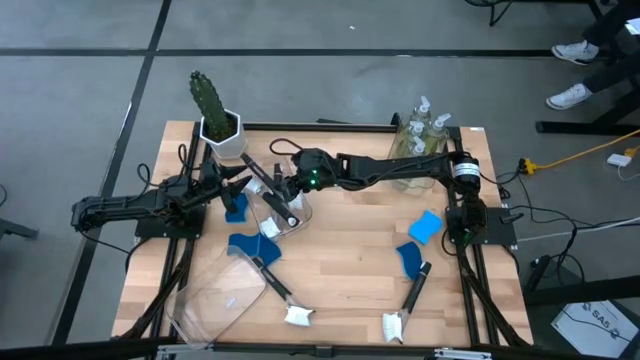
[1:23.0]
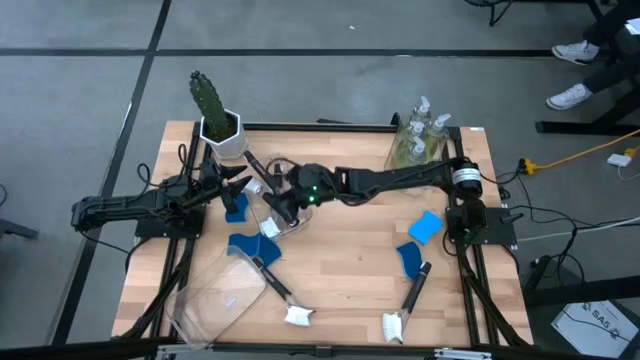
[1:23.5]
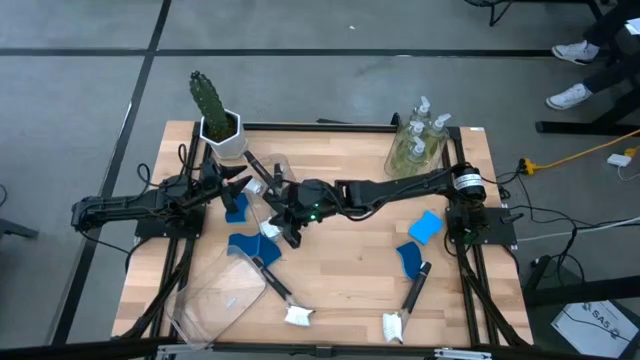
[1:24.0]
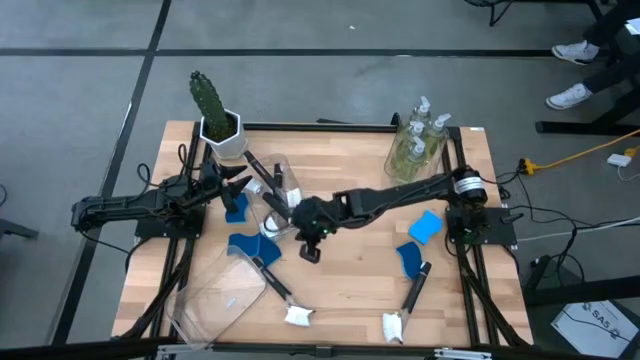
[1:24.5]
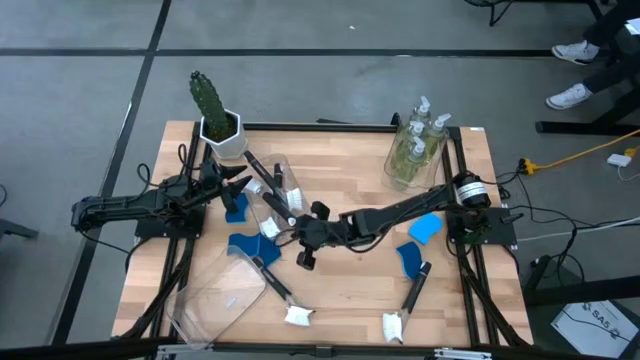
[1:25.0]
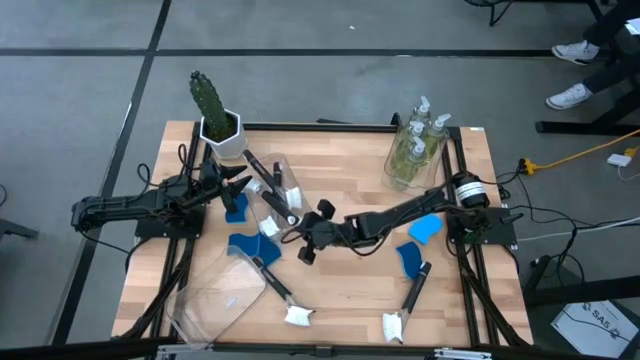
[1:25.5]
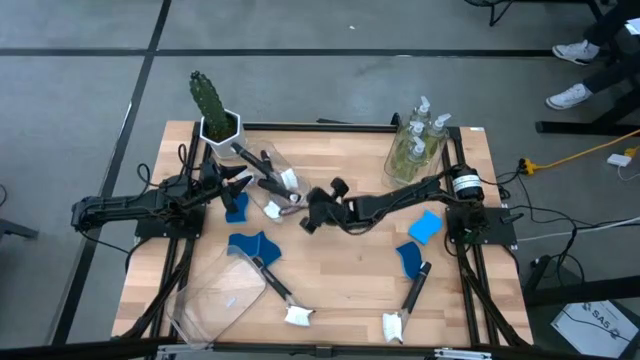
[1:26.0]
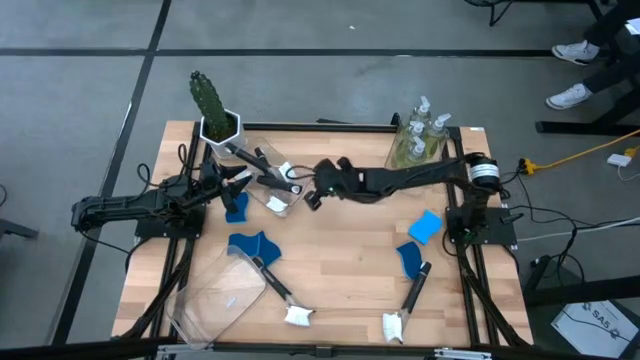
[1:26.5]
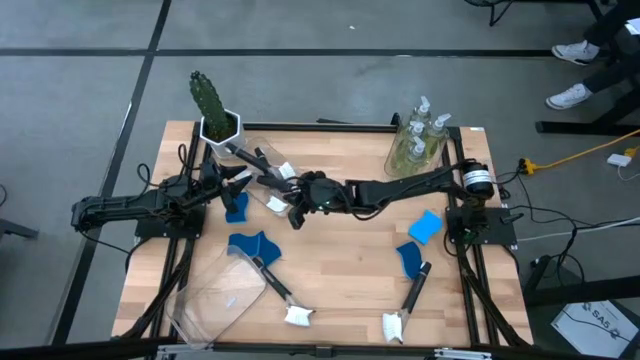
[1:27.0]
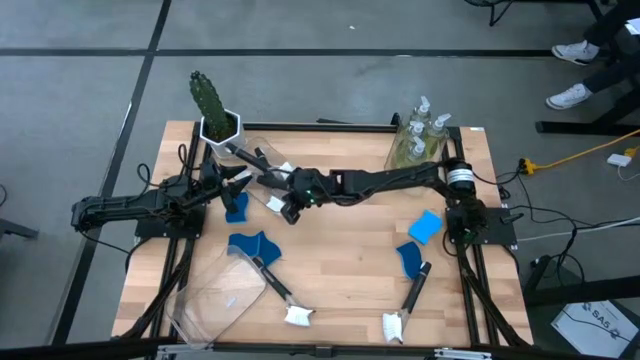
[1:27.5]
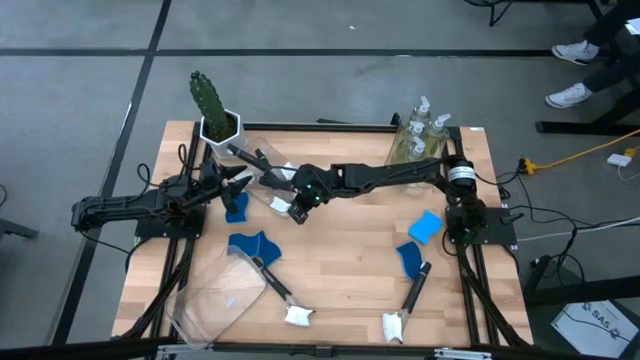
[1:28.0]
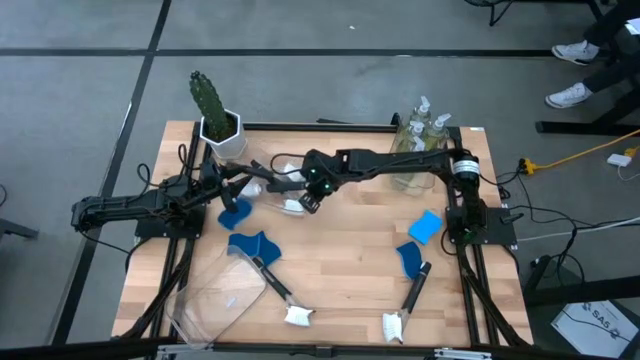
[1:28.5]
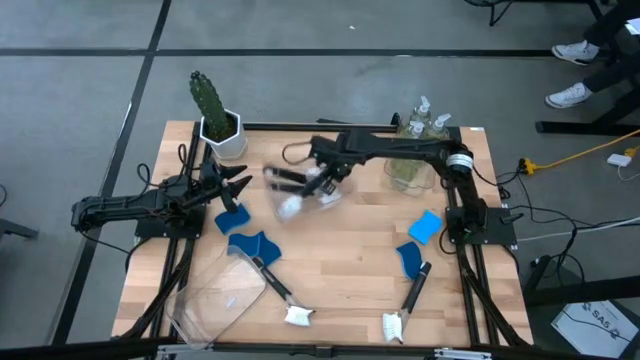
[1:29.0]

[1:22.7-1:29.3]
Task: Pick & Place Kitchen Sink Supplies
Adjust the top left transparent bin

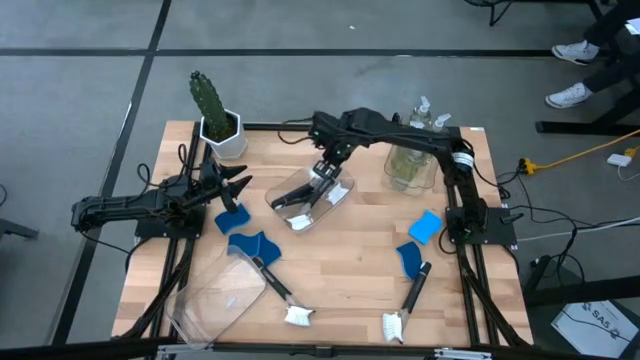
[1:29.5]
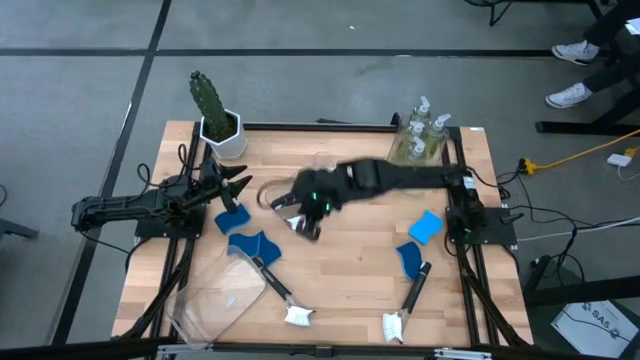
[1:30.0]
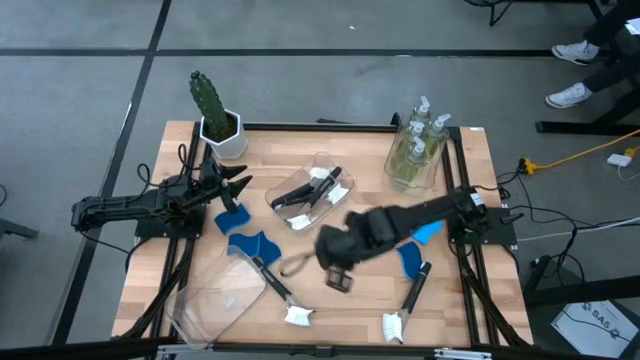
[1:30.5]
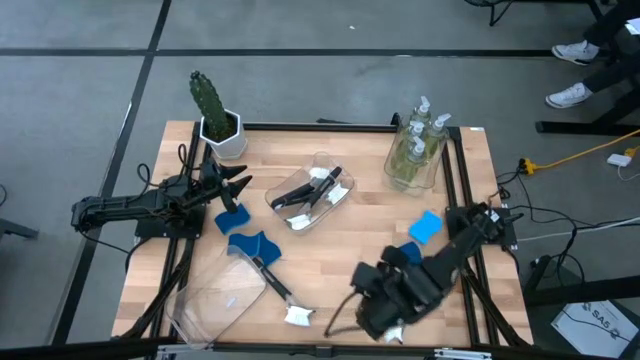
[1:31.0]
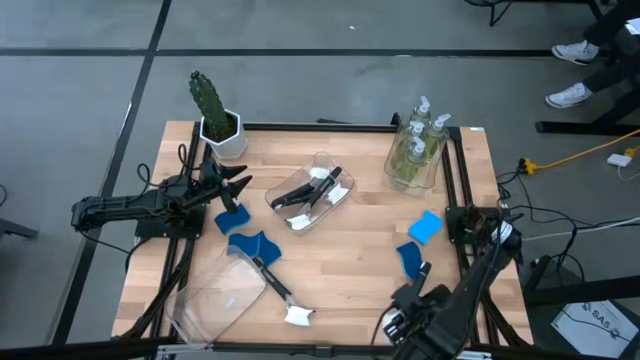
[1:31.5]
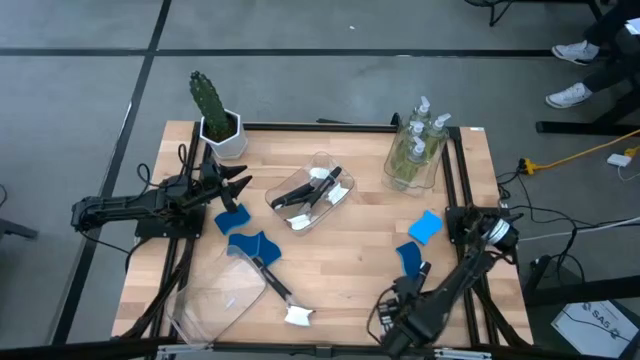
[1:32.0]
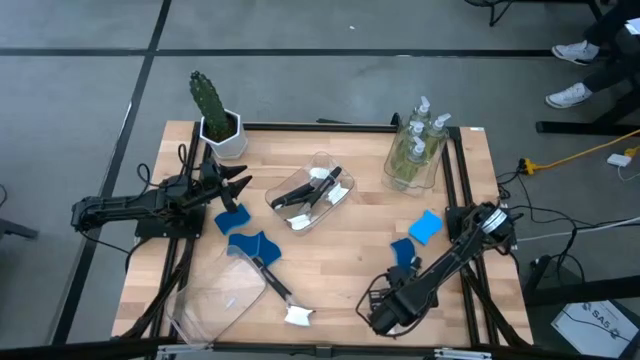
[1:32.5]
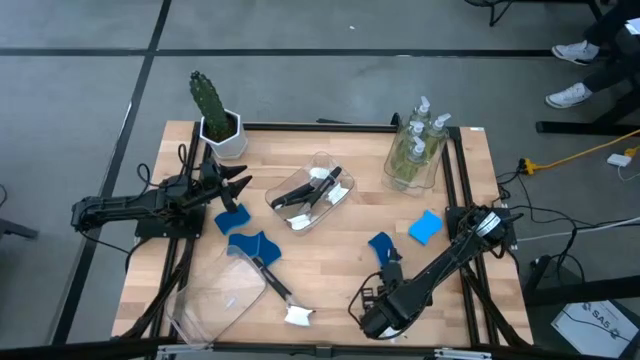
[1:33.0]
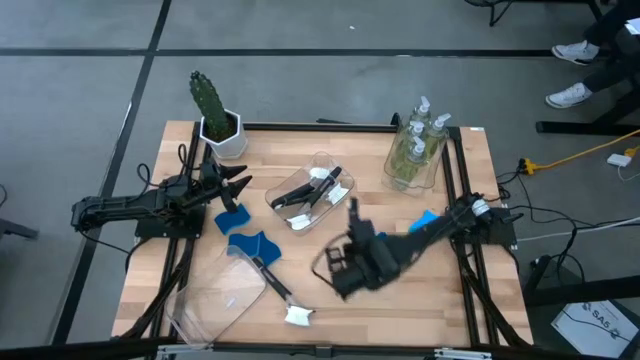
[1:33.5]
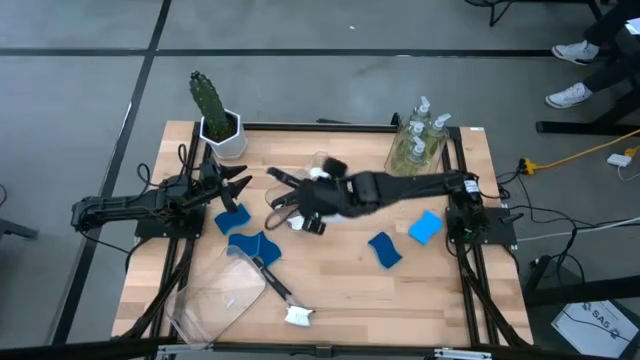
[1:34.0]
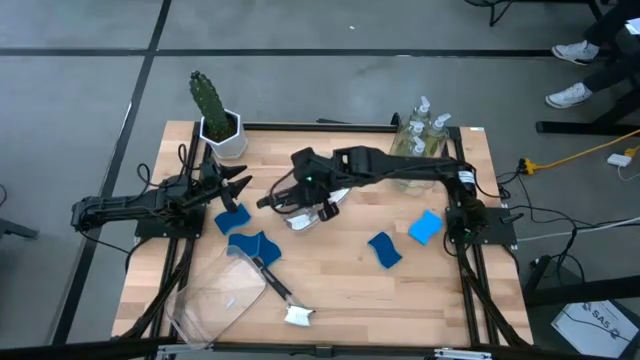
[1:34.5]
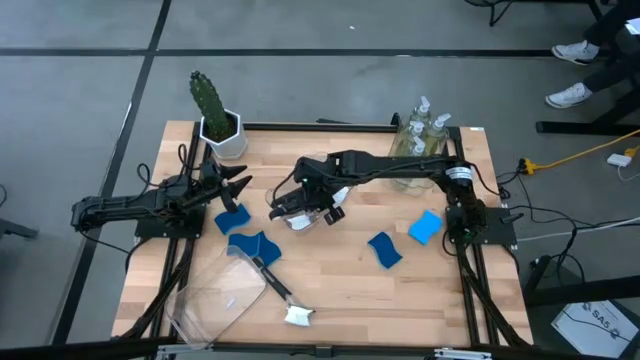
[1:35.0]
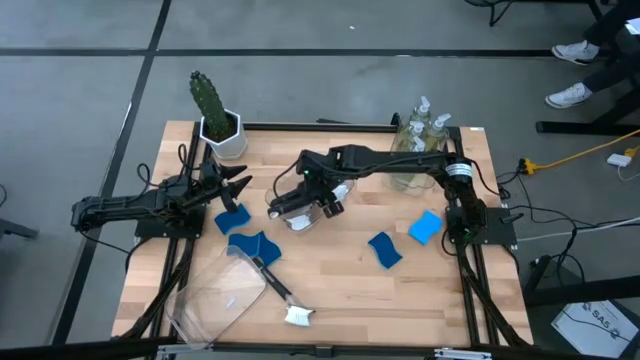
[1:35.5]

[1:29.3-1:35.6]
Put the black dish brush into the top left transparent bin

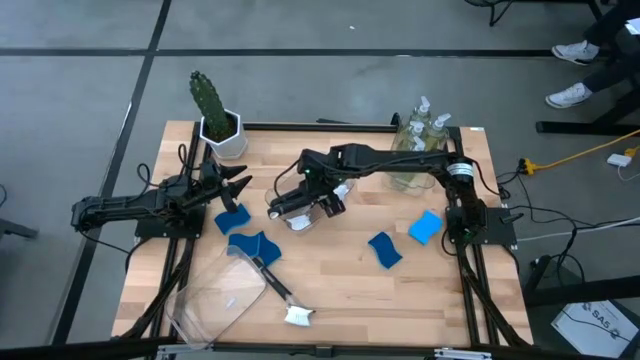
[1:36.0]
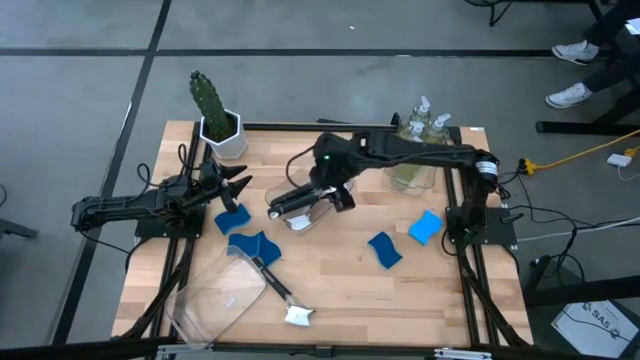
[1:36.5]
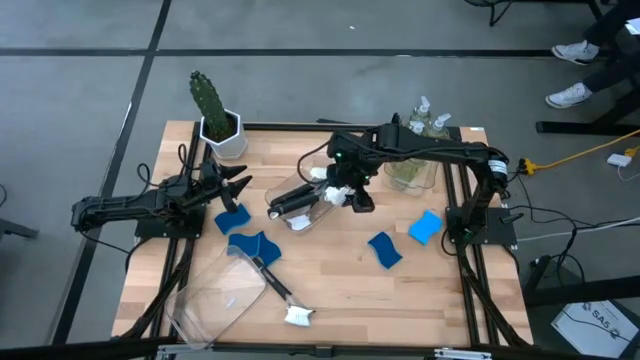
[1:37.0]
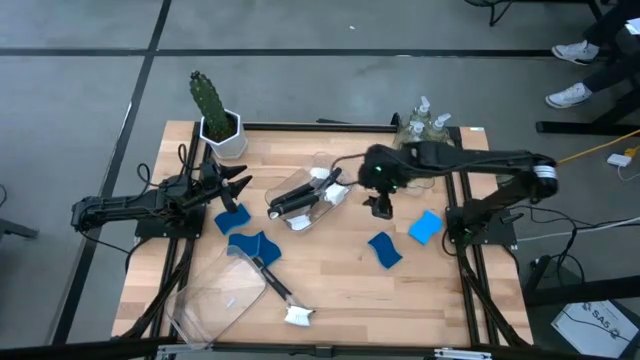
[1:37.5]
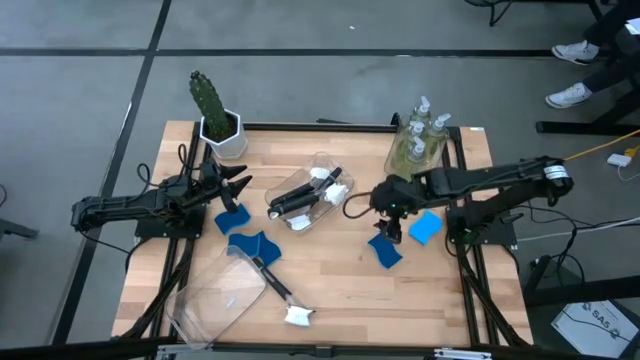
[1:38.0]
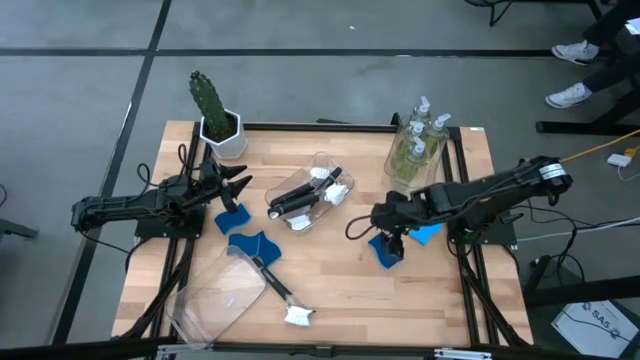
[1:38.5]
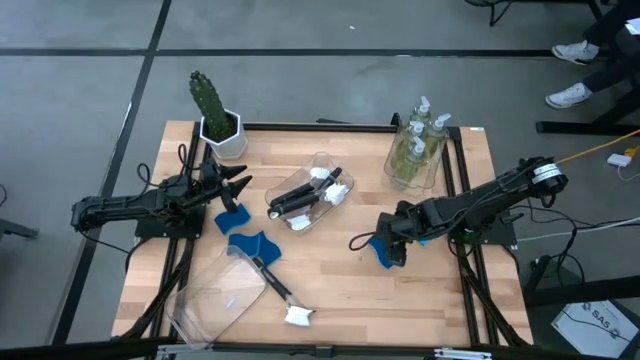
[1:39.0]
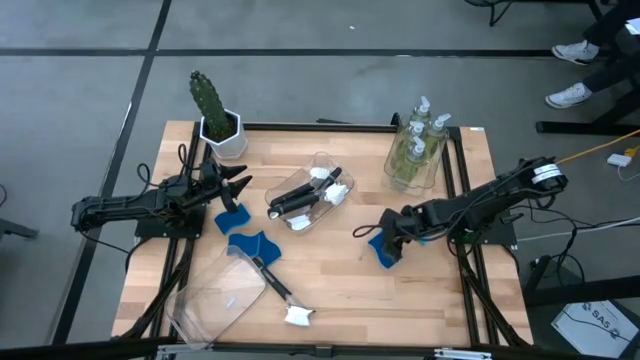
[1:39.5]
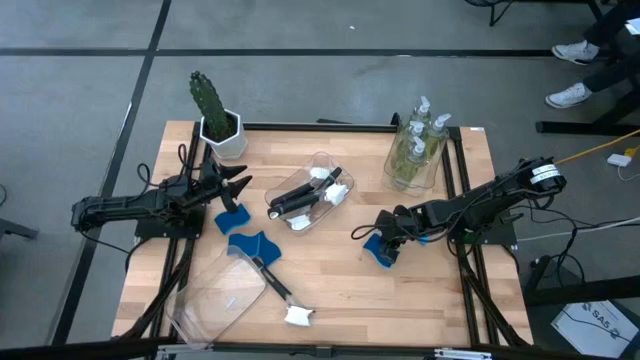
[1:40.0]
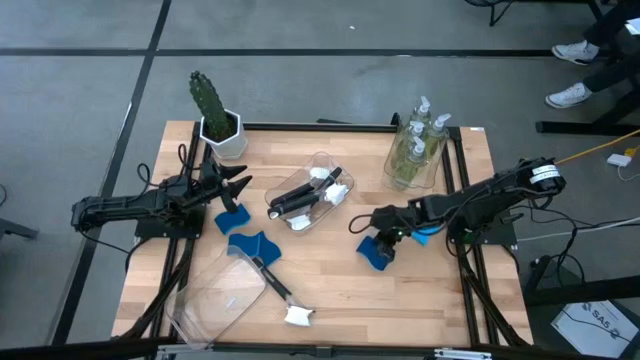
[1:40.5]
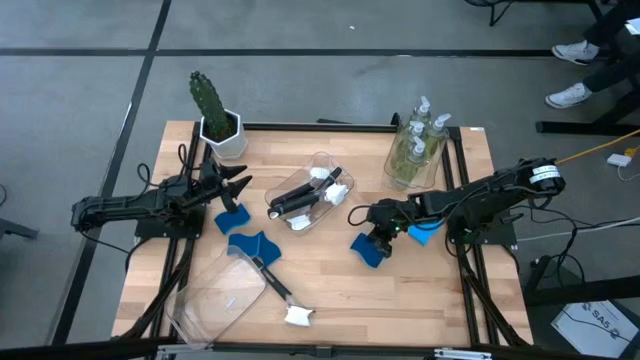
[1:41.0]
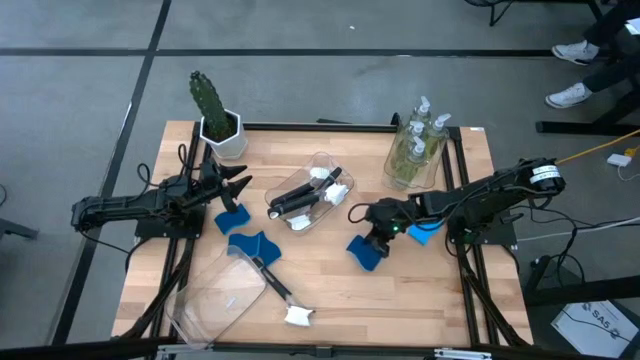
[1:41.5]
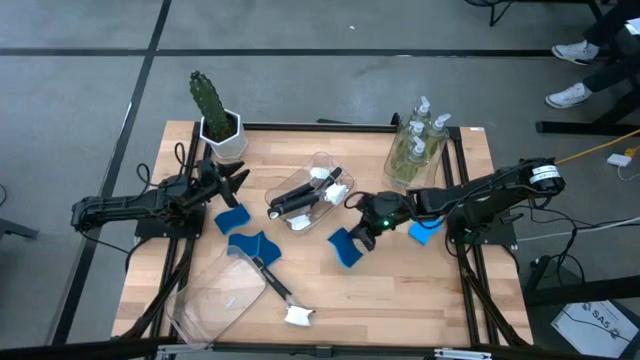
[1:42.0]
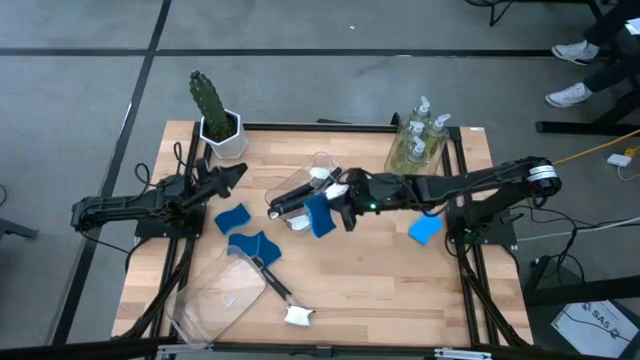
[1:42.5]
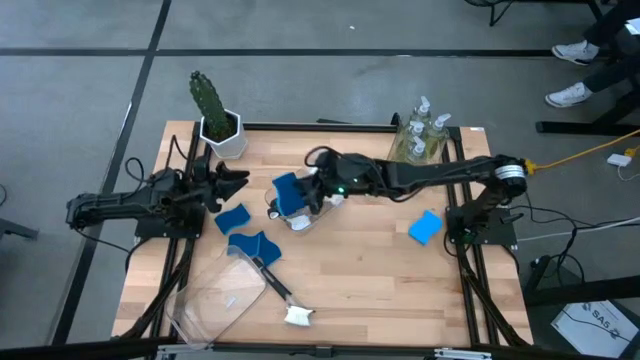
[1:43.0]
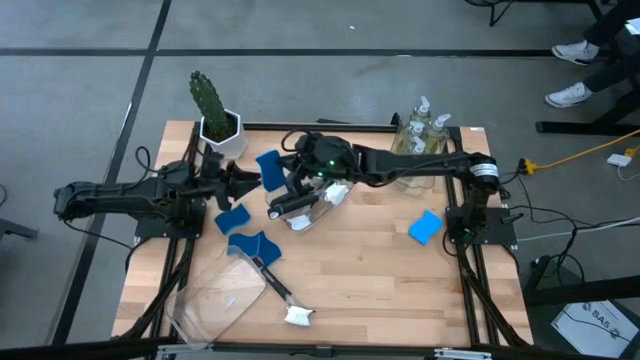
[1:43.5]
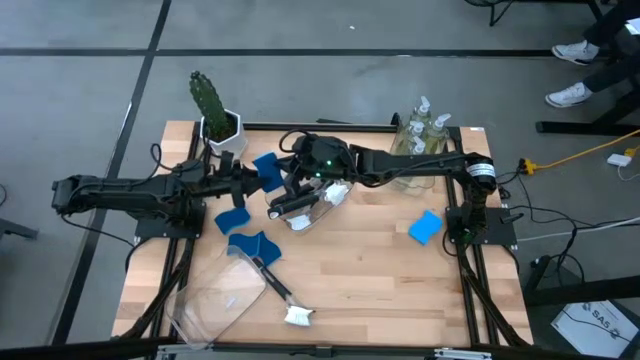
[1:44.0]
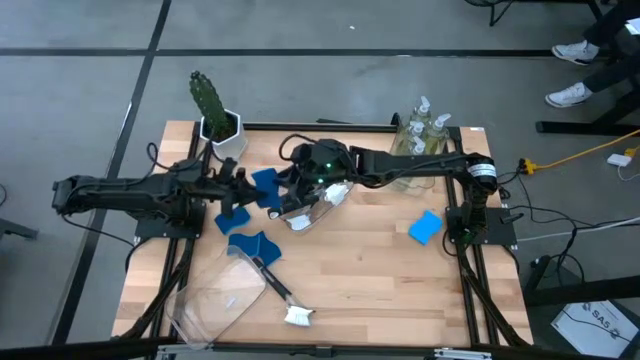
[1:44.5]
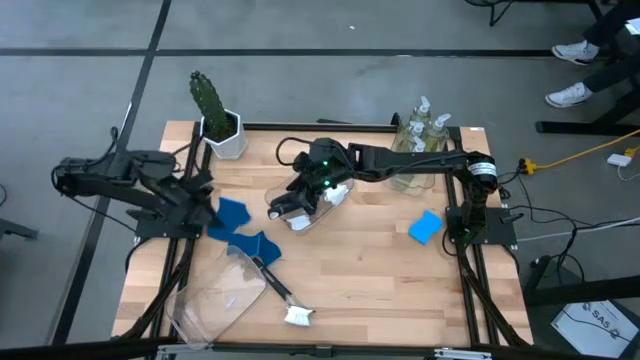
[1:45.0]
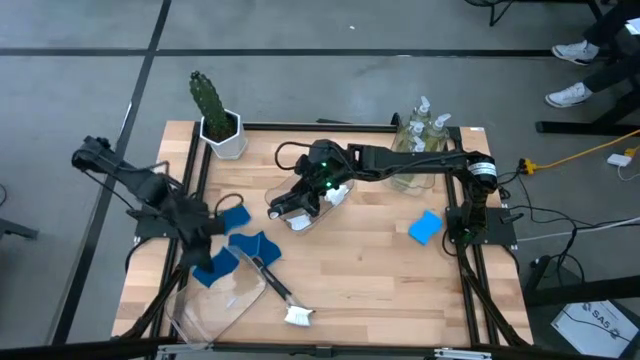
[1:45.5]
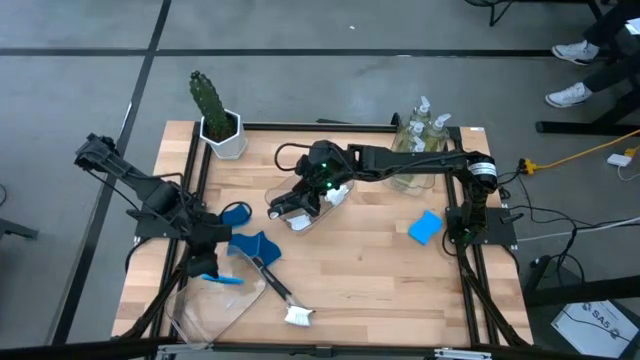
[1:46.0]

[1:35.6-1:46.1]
Put the blue sponge into the bottom transparent bin
